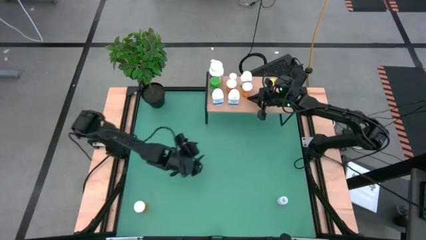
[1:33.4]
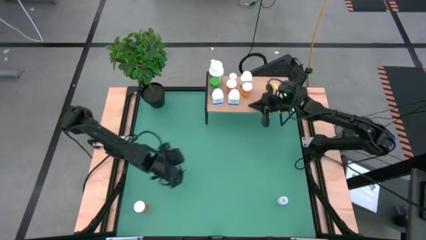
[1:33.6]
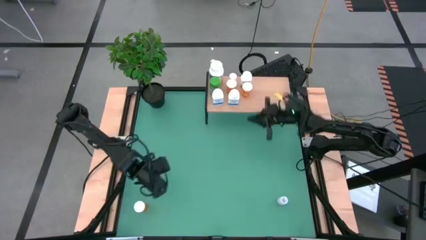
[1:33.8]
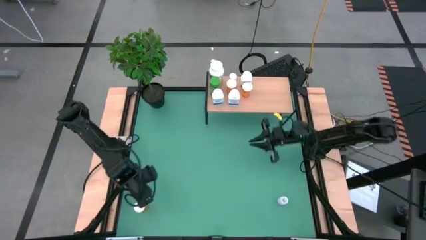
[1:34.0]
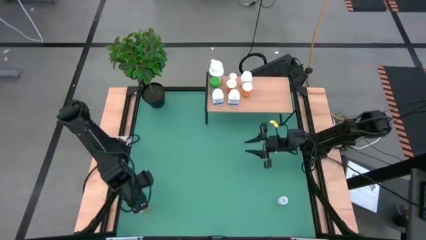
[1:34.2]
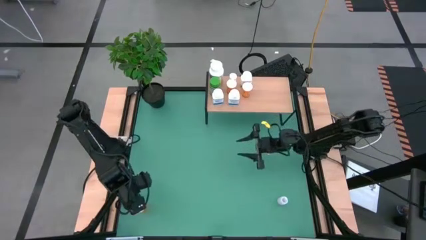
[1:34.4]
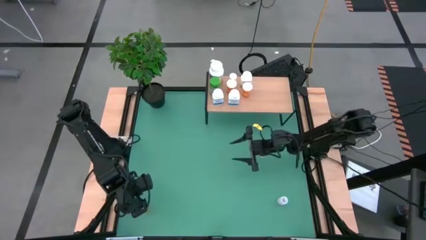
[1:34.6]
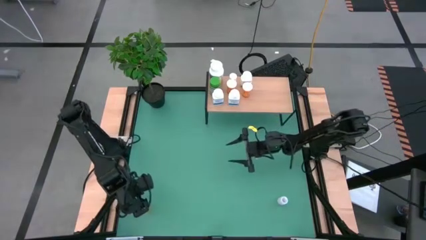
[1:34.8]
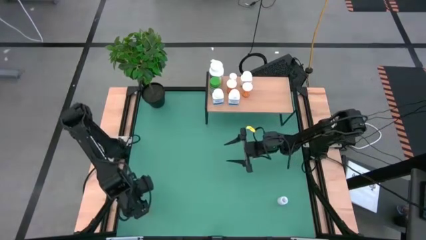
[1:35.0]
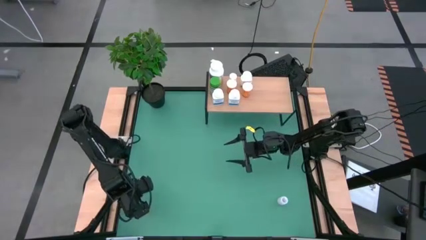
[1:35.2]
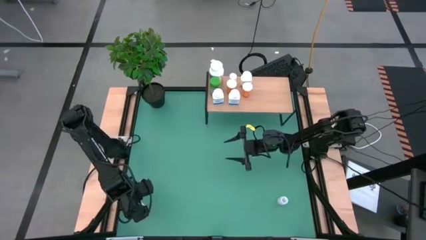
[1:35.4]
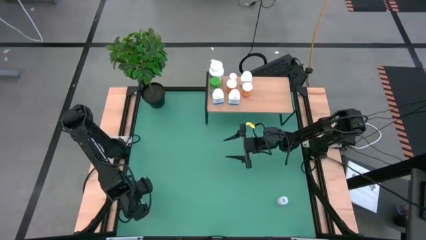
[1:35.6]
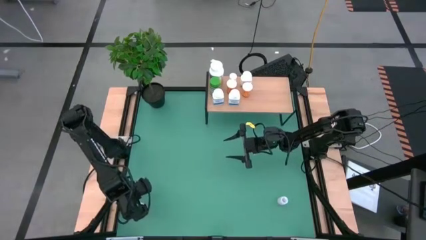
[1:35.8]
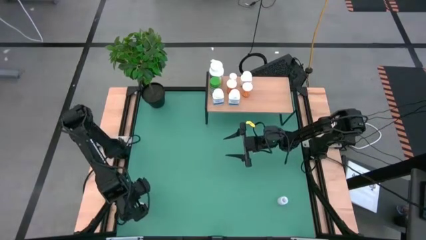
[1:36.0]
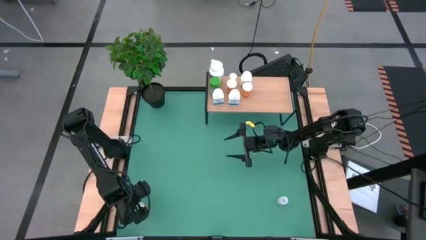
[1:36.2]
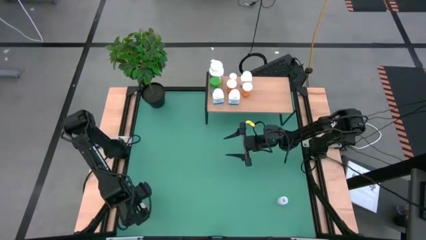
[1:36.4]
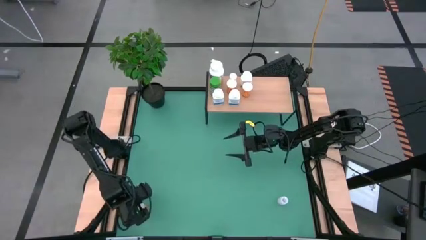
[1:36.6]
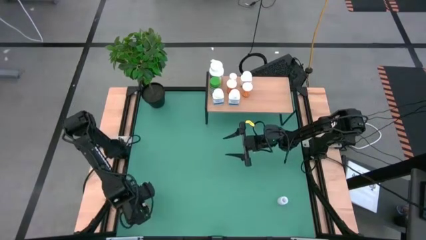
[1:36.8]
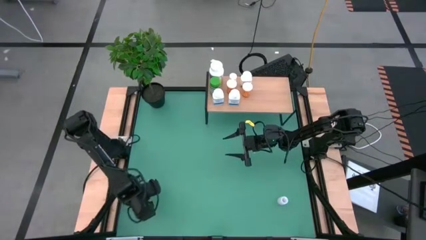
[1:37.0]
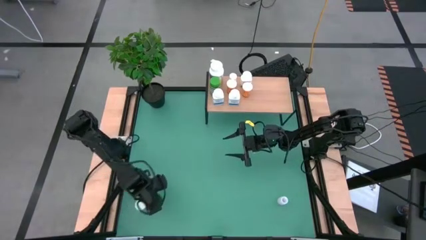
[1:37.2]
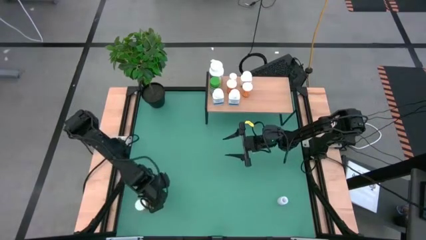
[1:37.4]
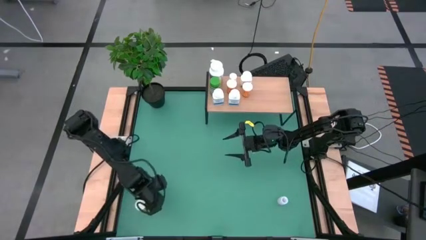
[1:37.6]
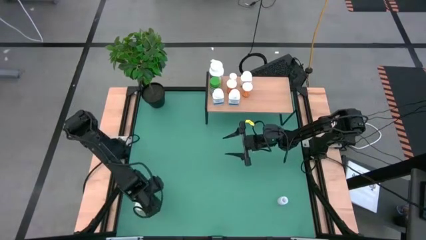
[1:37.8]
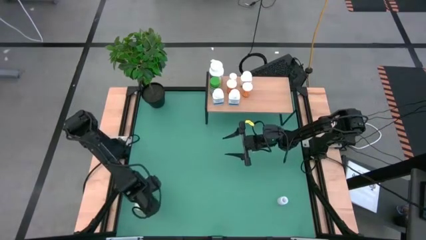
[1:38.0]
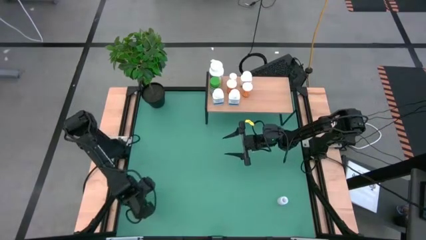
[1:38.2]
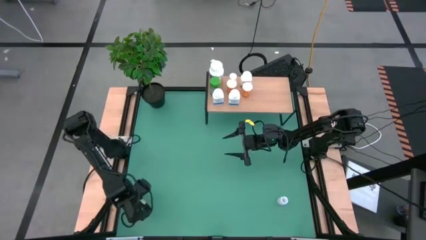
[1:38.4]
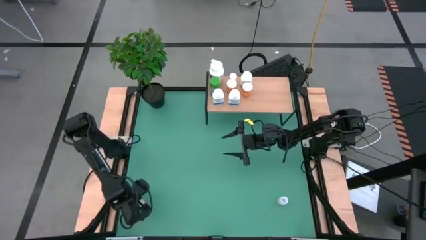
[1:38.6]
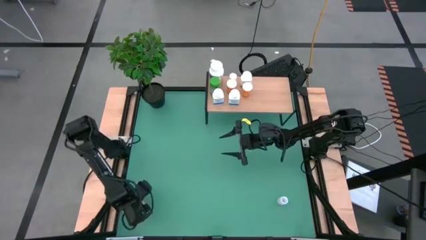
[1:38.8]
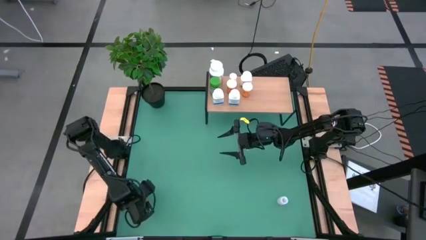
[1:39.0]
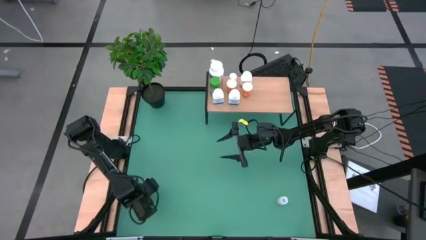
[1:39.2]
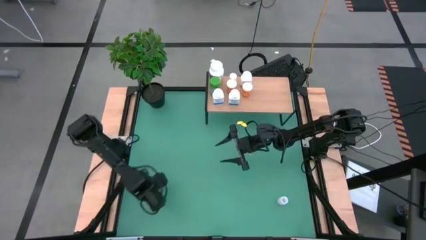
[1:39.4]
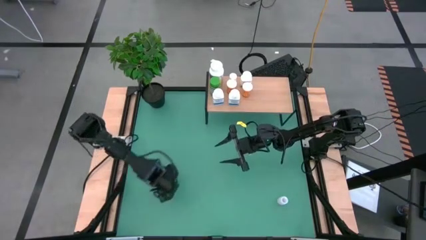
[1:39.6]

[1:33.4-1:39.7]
Task: Pick and place medicine bottles onto shelf by color
Put the orange medicine bottle on the shelf

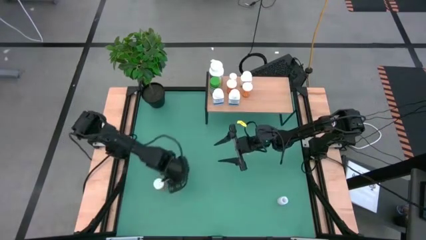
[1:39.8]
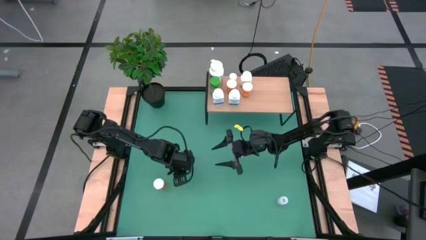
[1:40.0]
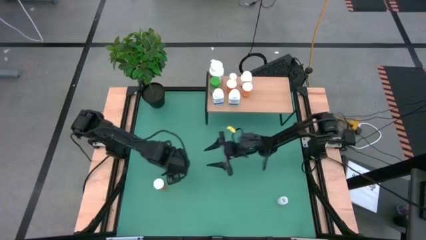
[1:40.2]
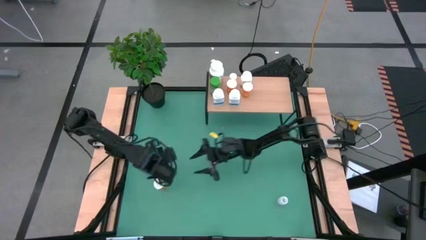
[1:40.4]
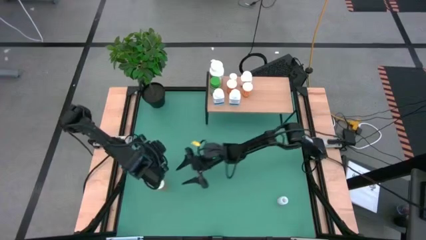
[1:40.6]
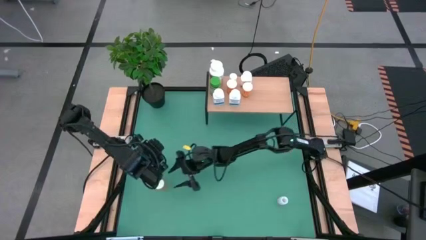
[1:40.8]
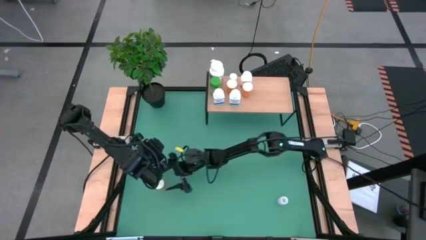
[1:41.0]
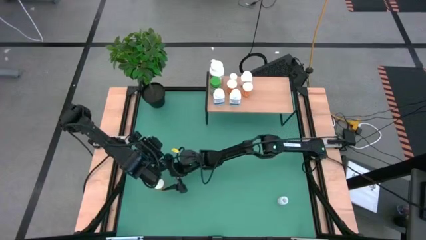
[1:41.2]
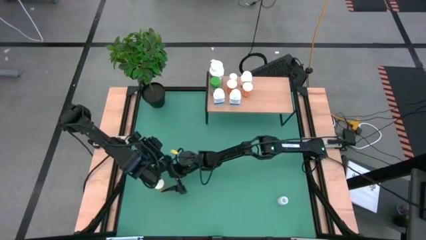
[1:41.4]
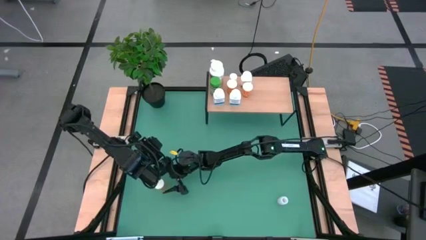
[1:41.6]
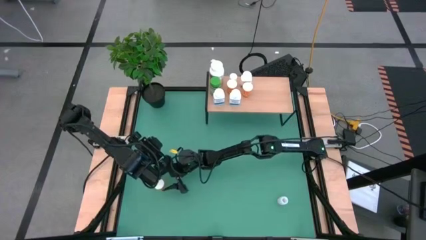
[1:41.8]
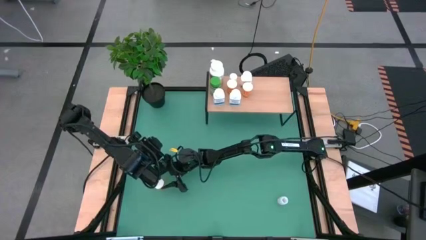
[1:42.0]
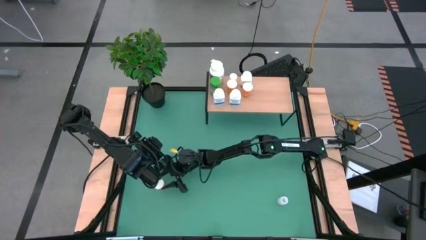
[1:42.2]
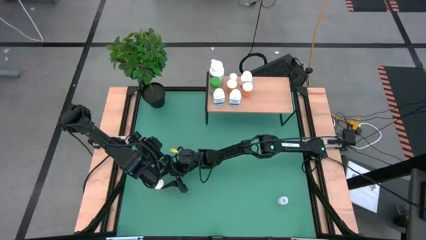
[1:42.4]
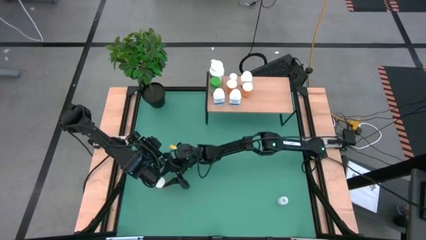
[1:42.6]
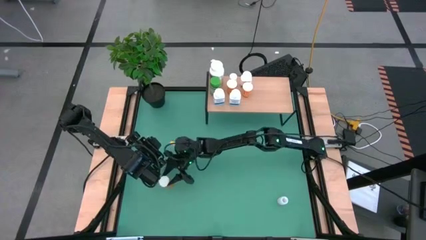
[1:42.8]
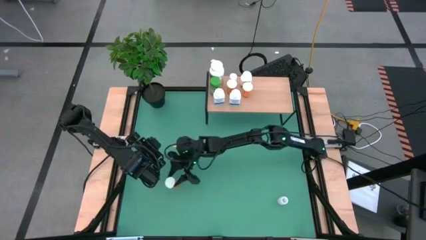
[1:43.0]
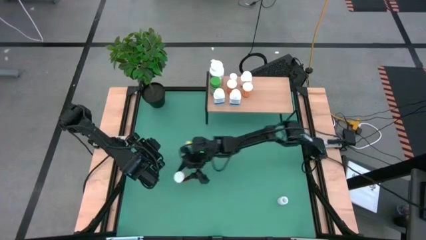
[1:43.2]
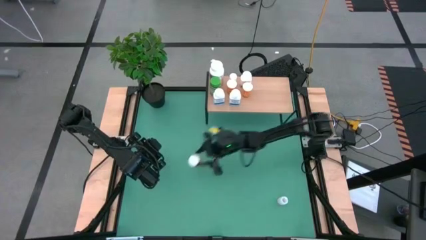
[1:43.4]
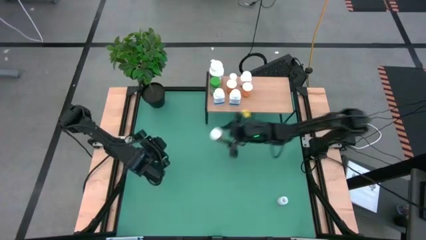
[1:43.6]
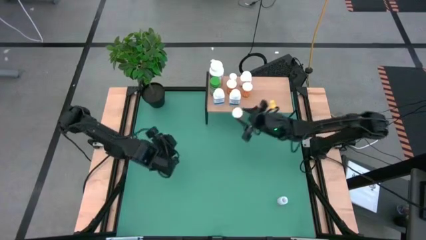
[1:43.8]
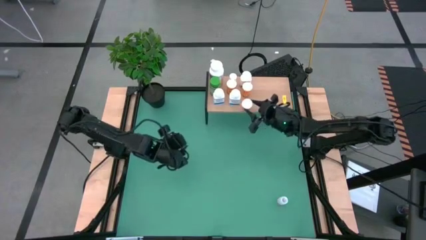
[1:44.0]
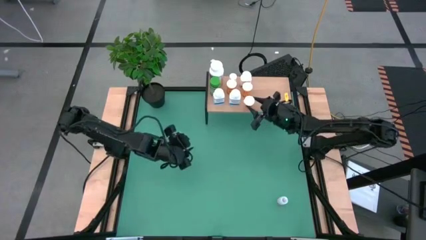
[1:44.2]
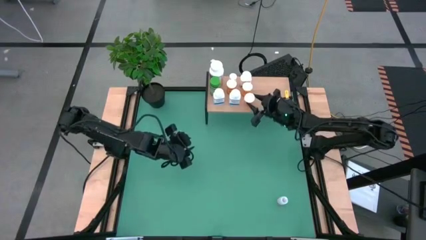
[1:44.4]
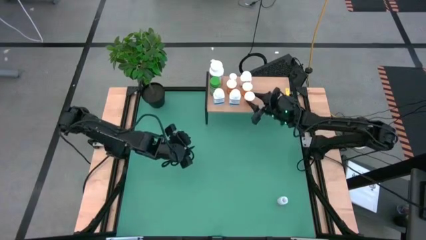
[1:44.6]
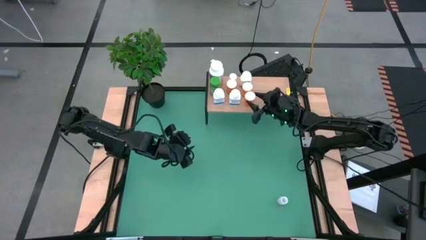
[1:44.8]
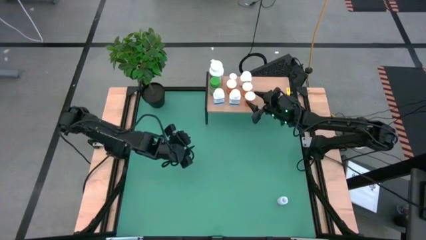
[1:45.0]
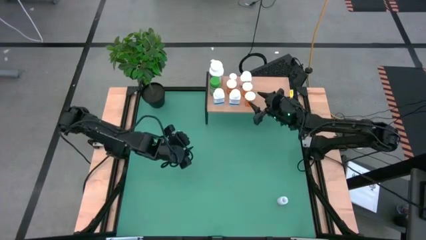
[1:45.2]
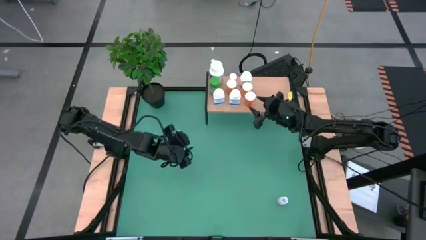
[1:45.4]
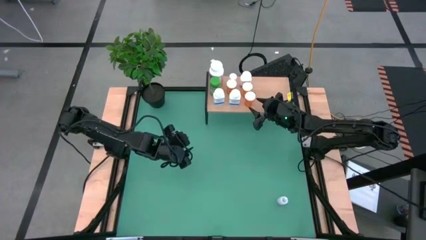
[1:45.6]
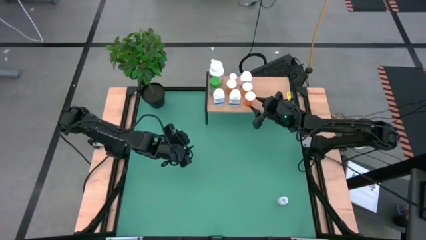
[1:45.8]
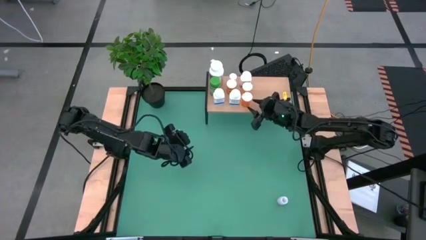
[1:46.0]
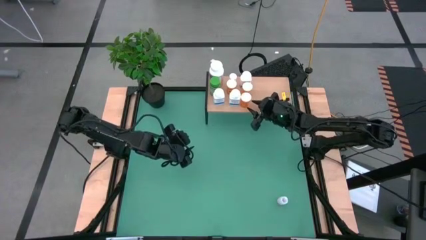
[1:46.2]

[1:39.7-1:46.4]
Put the orange medicine bottle on the shelf

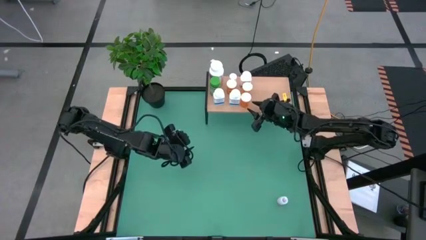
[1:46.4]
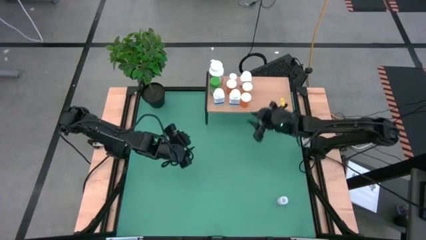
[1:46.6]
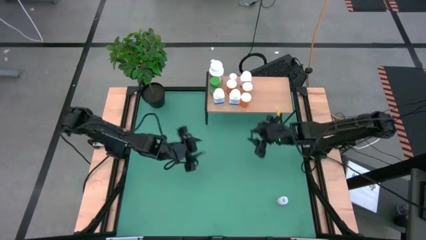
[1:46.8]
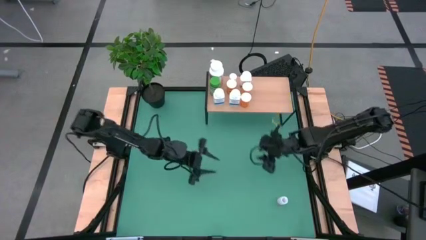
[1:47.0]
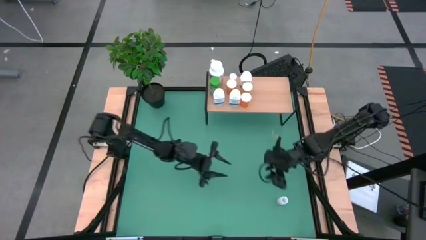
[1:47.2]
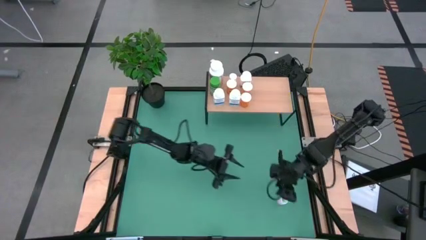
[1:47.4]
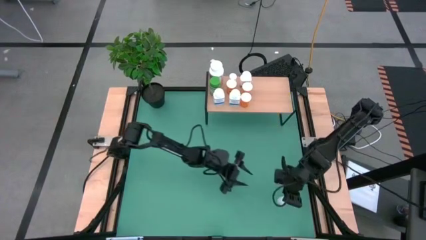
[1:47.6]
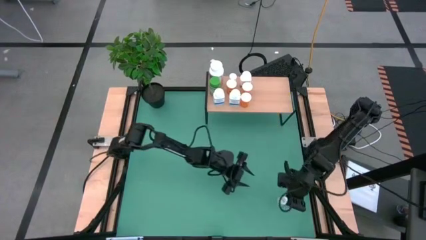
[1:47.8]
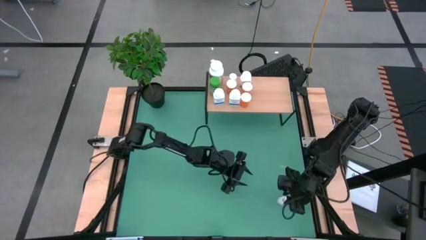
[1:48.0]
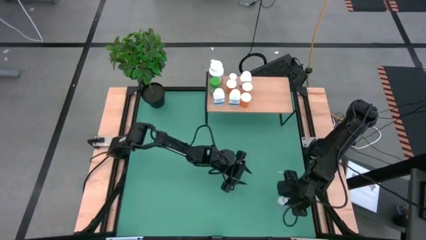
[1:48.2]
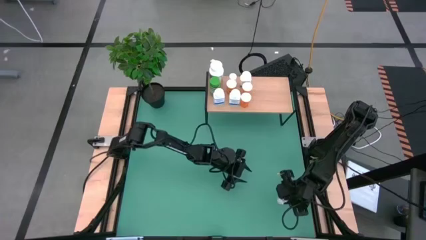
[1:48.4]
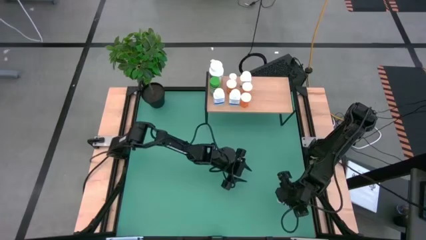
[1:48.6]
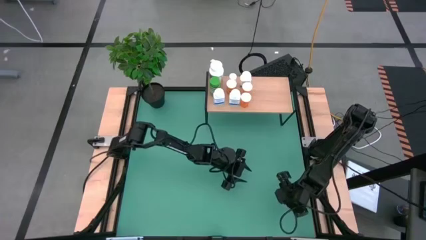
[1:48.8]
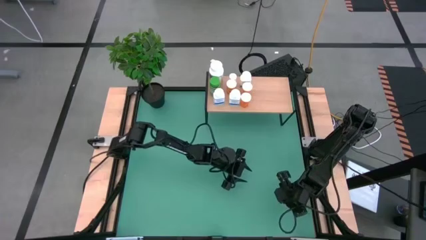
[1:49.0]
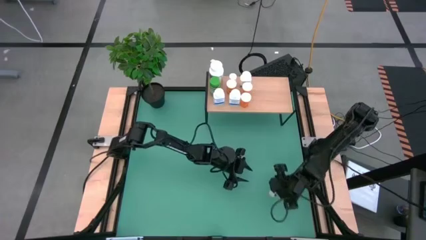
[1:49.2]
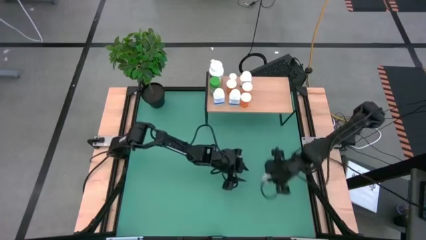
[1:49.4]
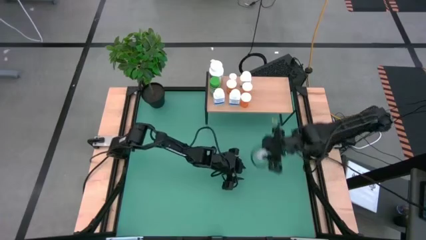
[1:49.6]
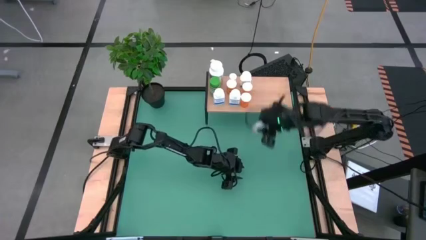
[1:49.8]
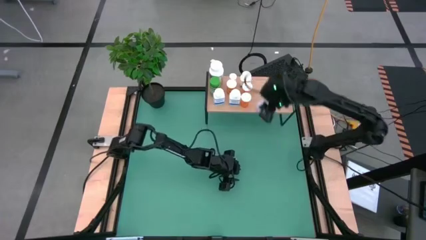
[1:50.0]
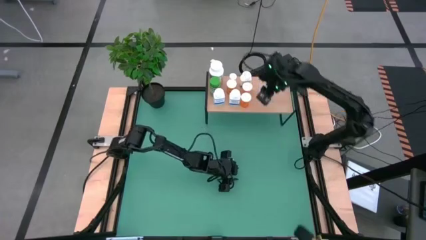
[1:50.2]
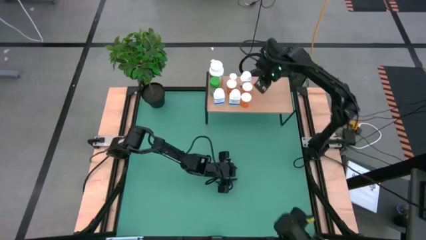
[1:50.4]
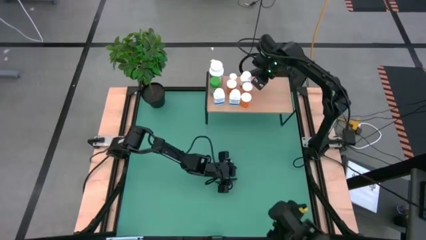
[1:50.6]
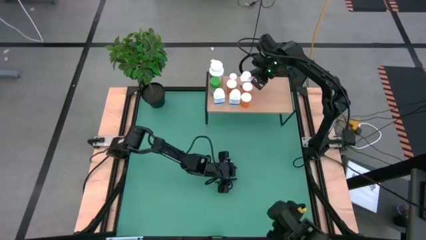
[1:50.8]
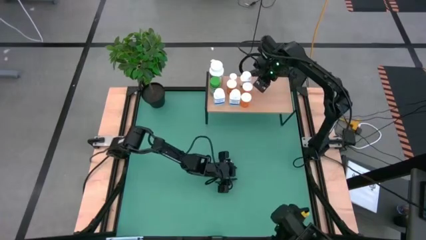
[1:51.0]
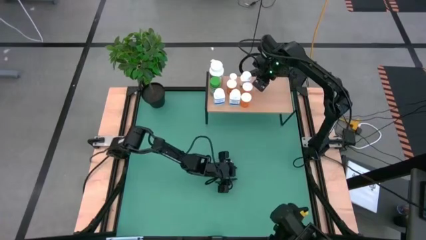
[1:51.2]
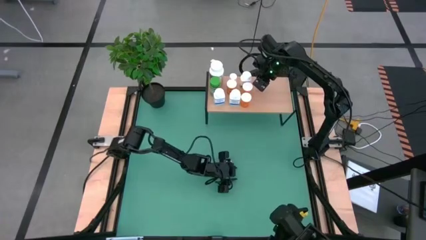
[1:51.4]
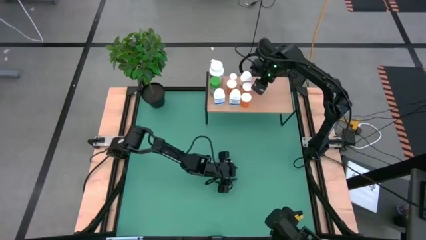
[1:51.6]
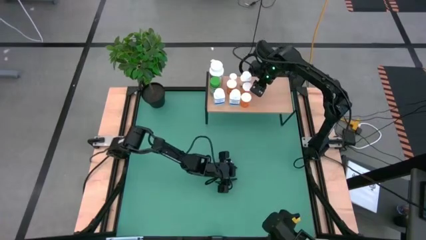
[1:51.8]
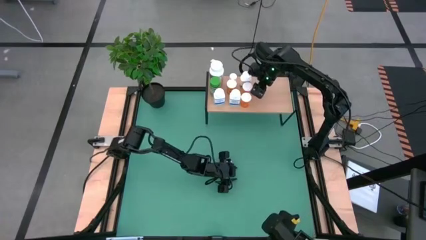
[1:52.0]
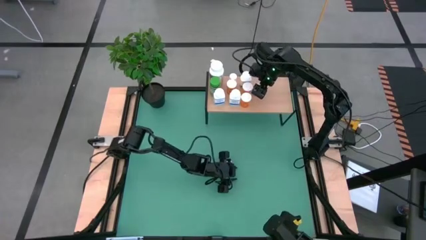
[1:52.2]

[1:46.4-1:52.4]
Put the transparent medicine bottle on the shelf
